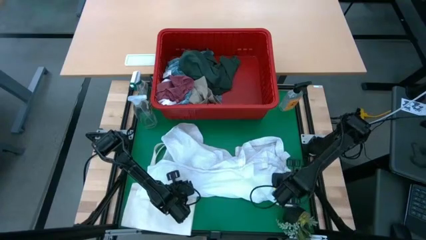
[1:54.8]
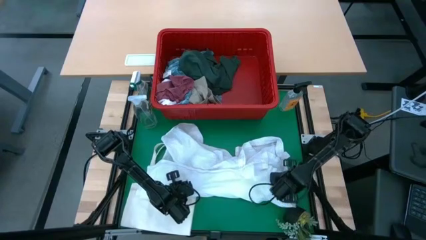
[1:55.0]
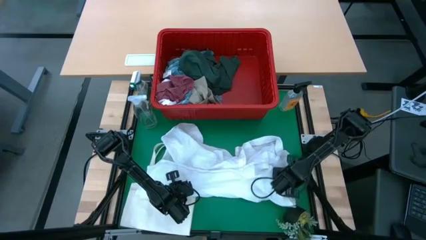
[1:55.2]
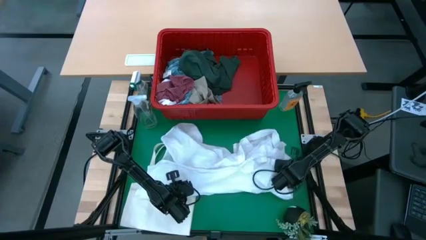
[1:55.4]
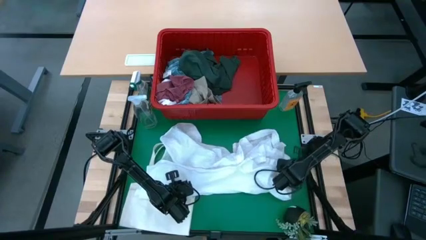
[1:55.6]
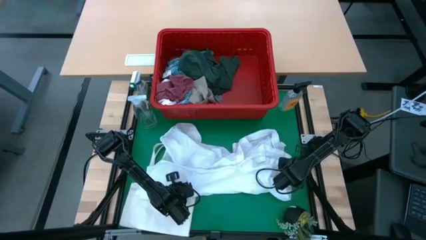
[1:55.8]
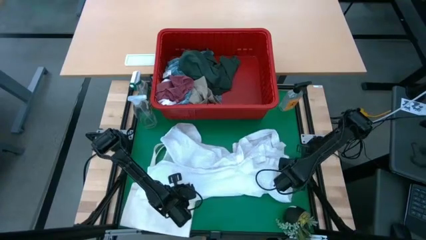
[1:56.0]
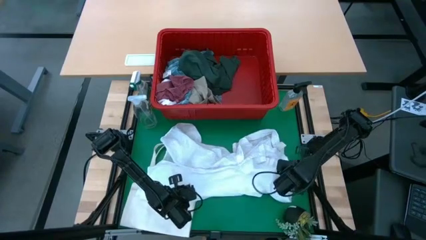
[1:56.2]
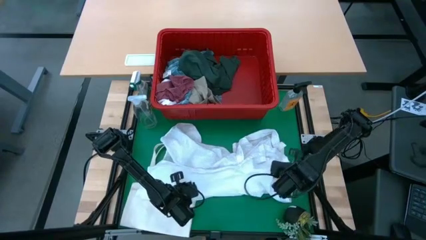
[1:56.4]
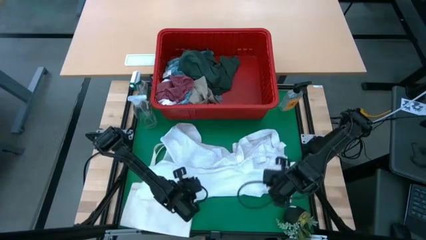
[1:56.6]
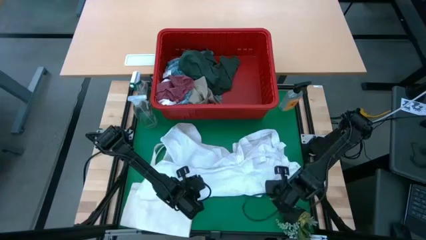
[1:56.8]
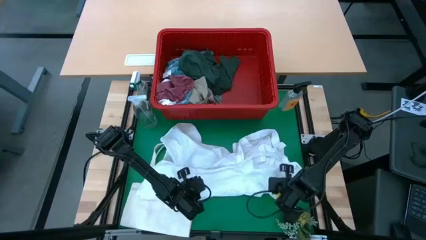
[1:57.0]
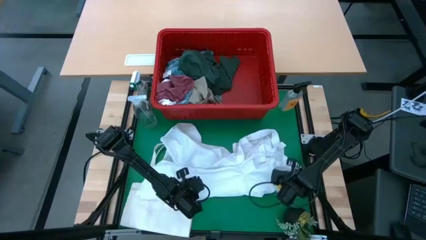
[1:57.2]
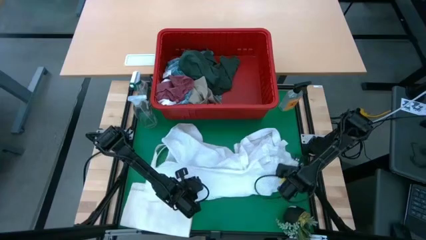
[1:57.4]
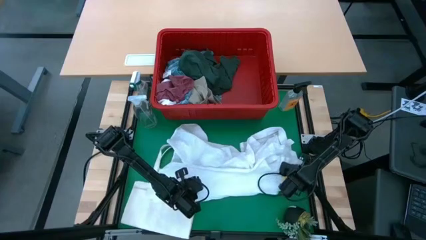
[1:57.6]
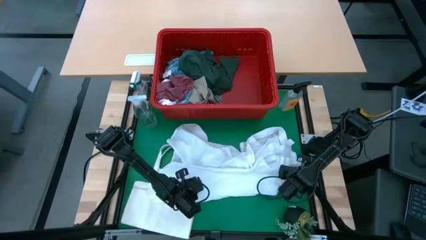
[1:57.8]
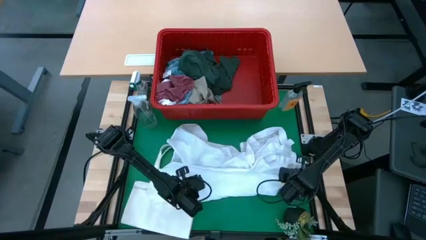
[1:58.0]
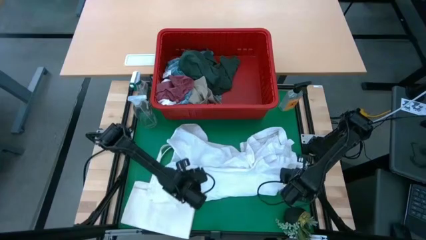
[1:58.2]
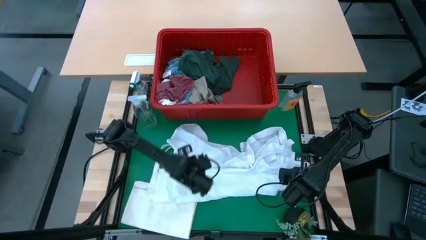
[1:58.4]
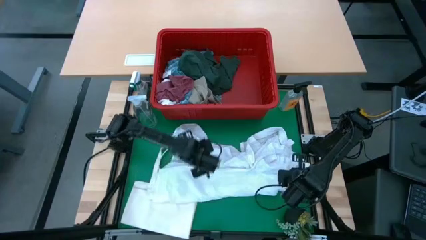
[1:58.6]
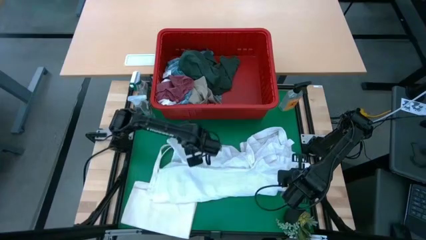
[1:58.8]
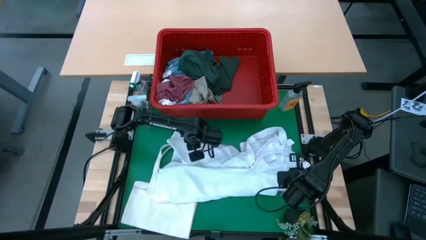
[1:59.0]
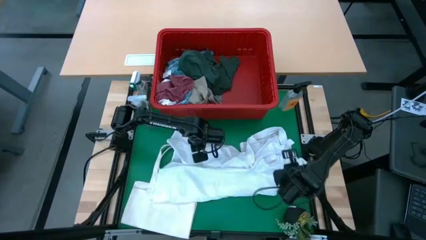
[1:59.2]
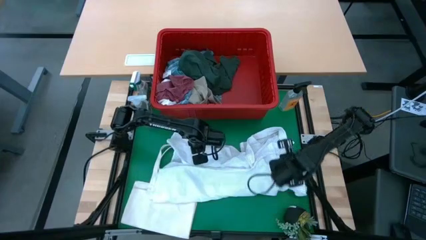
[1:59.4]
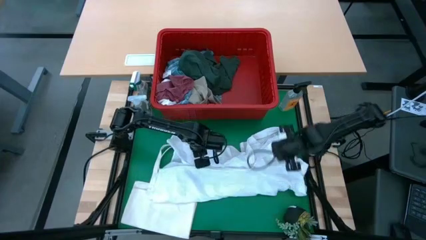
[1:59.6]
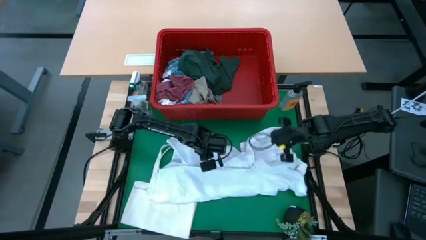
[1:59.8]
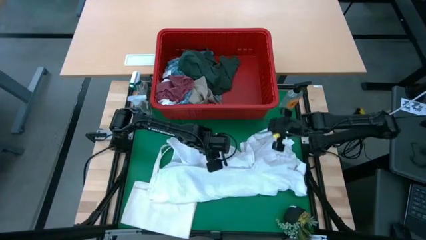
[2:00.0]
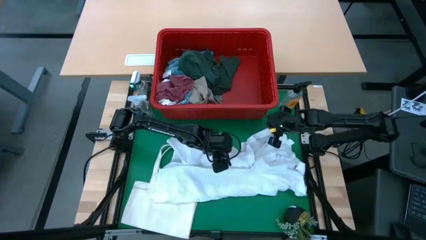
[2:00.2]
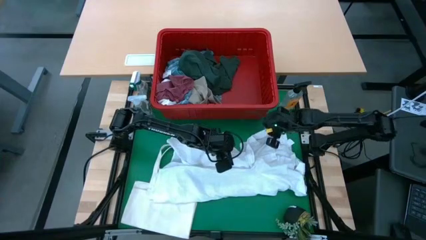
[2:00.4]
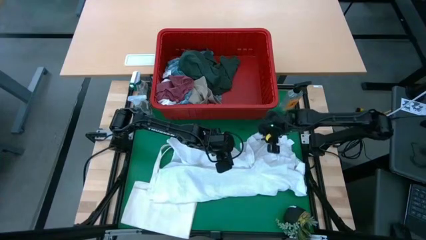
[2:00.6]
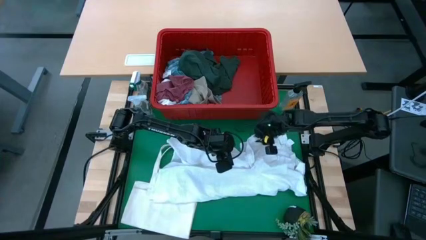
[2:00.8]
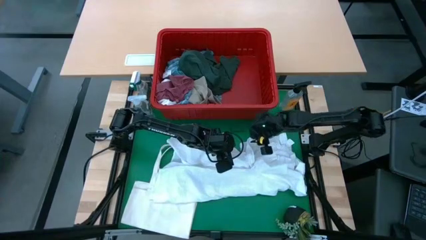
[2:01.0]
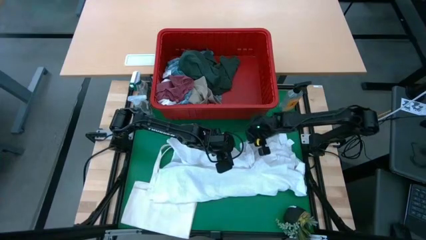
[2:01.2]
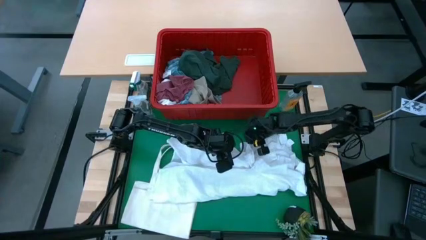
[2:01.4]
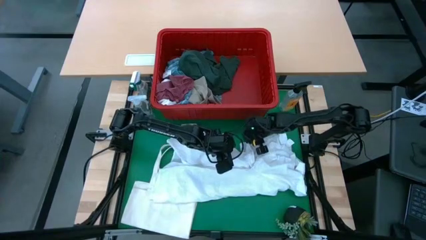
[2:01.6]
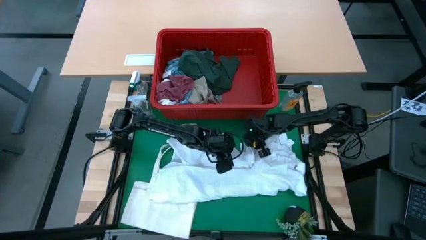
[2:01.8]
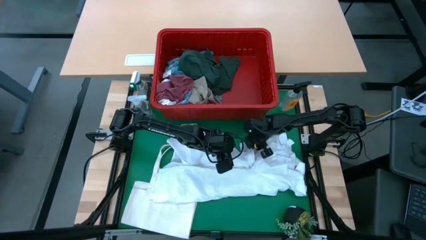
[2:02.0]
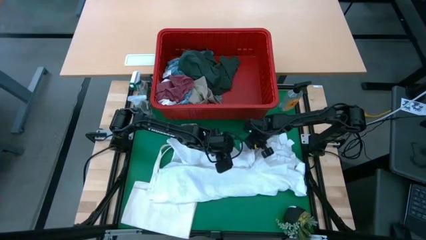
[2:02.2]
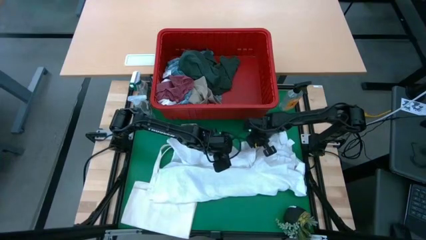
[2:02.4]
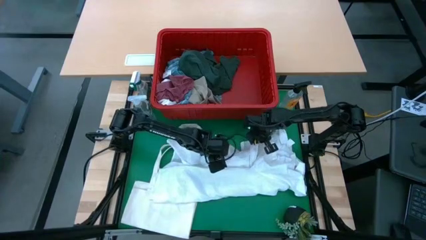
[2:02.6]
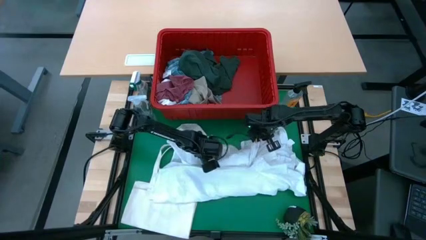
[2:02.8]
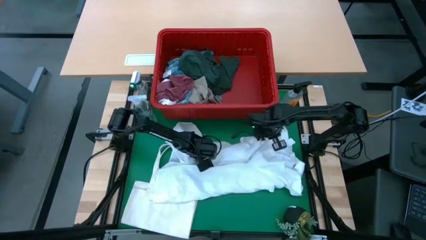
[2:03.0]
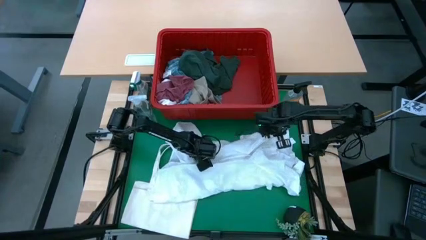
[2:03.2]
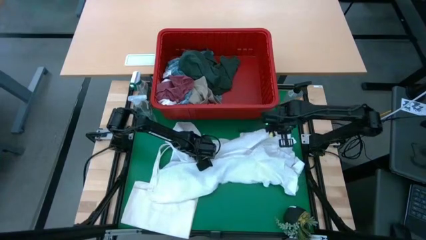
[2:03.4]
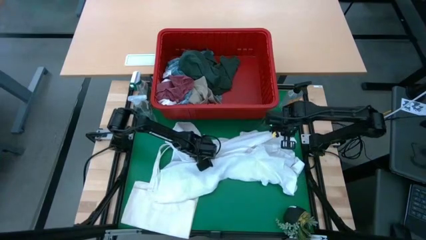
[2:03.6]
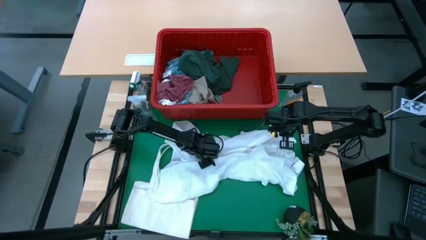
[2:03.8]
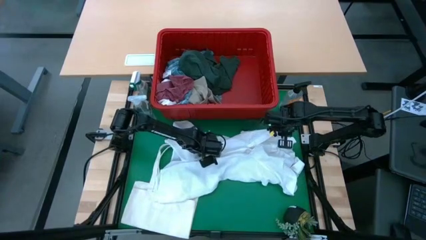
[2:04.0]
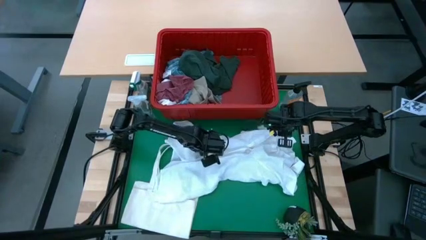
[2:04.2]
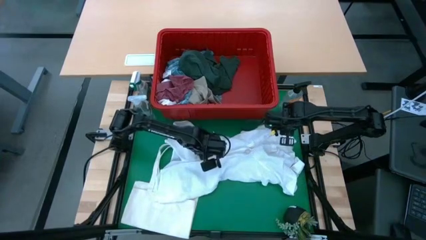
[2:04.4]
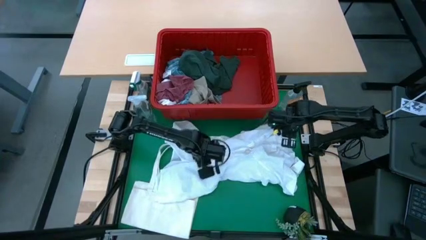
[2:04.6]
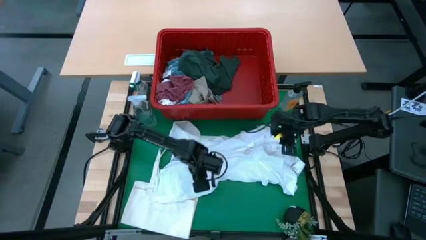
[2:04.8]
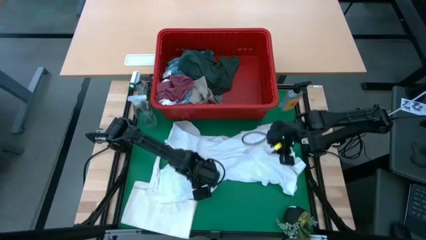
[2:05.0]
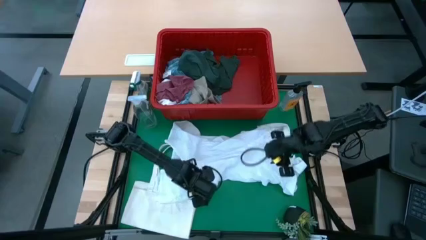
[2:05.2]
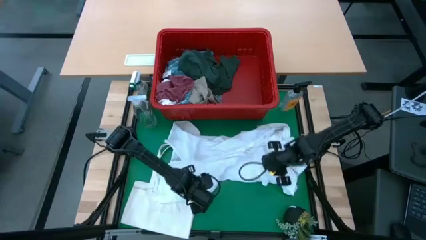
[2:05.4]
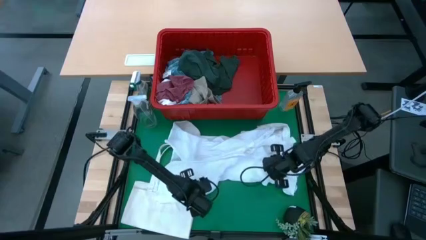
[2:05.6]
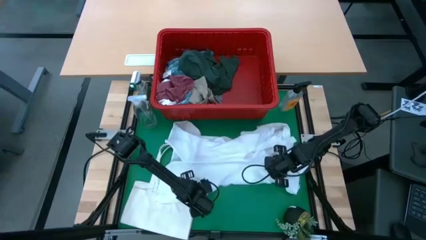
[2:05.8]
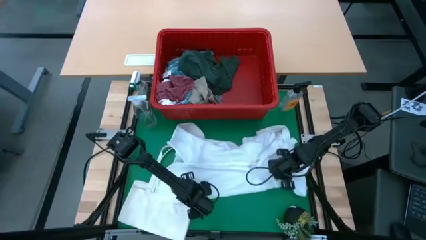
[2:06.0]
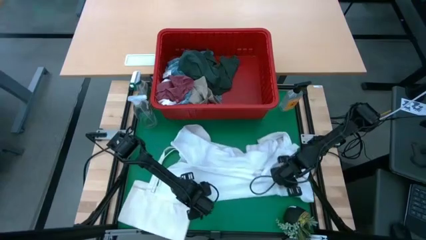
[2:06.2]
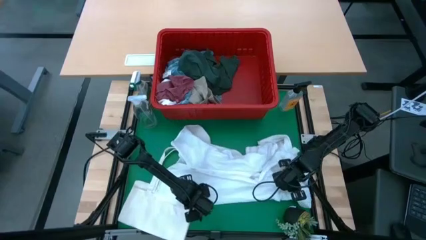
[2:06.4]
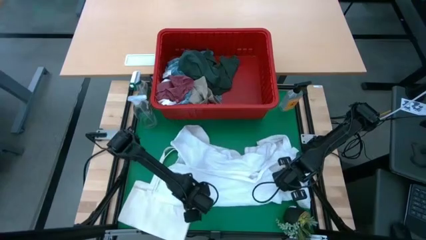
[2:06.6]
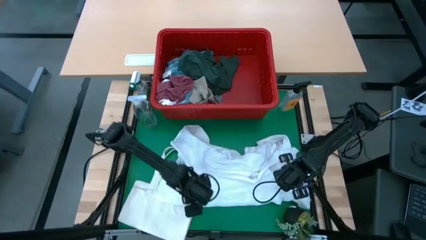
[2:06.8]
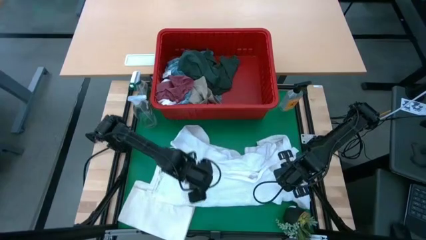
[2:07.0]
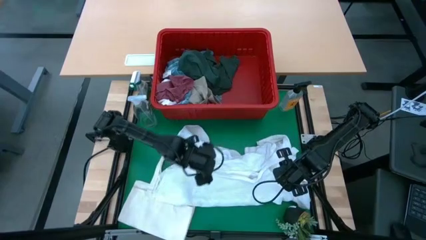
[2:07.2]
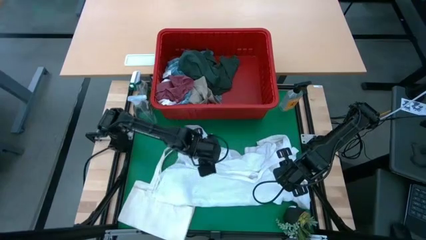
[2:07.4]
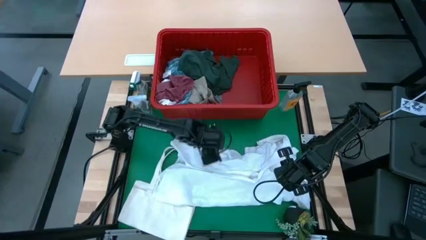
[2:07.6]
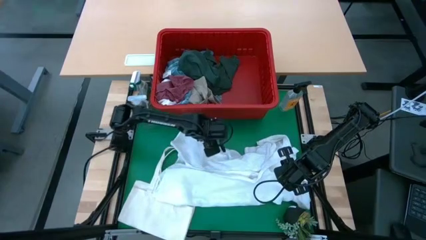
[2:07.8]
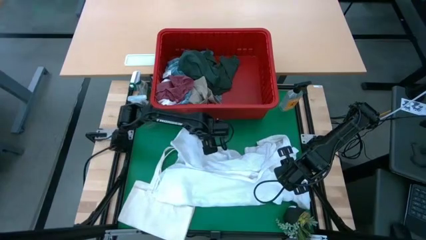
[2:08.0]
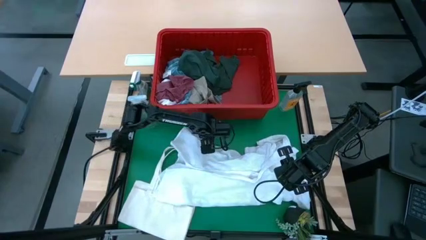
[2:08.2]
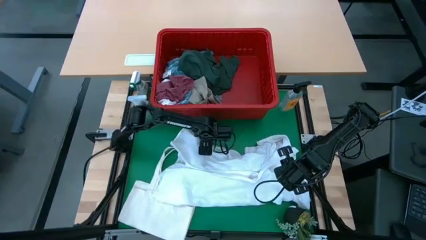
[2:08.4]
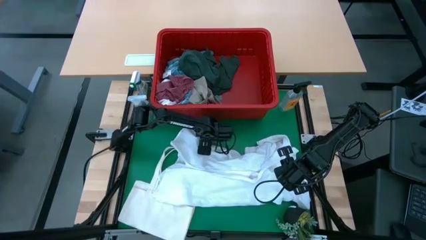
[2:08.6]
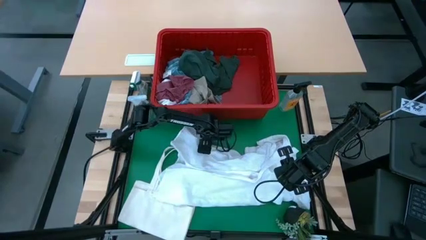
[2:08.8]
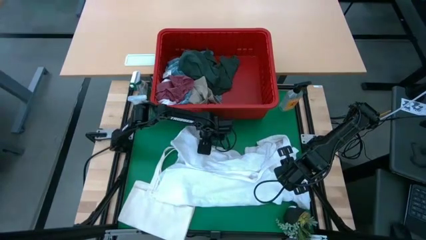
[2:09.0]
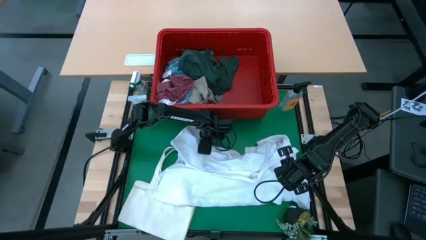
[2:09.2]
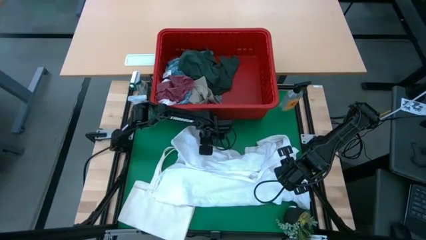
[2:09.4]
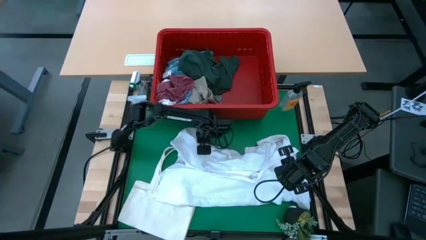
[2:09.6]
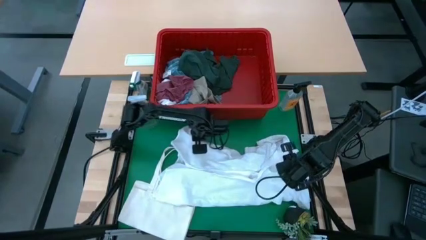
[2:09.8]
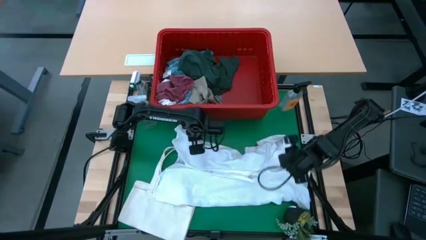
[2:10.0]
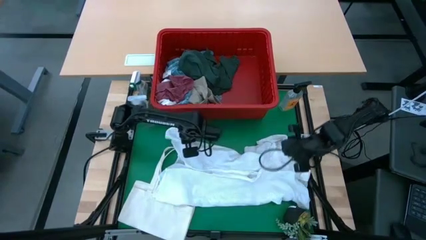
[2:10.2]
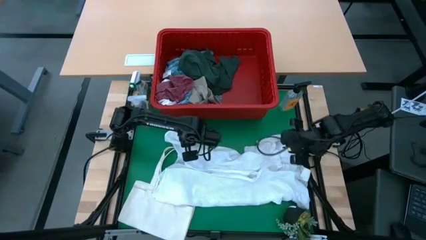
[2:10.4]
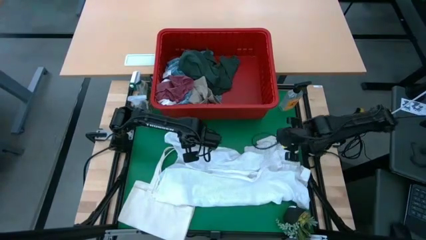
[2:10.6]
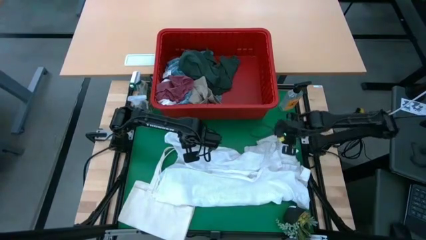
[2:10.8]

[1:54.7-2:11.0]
Task: Fold Laundry from Bin
Fold the white polo shirt
